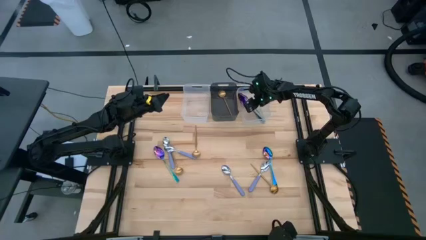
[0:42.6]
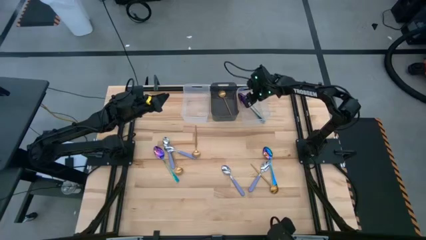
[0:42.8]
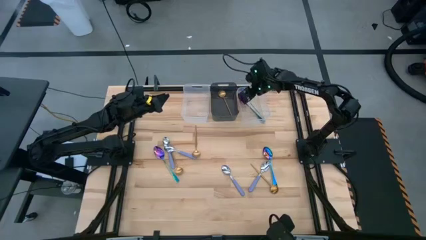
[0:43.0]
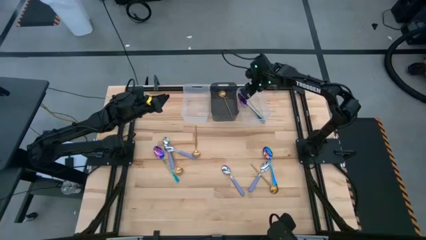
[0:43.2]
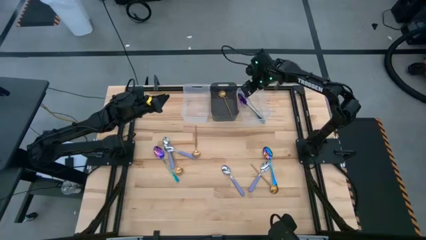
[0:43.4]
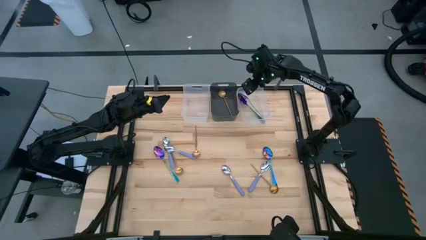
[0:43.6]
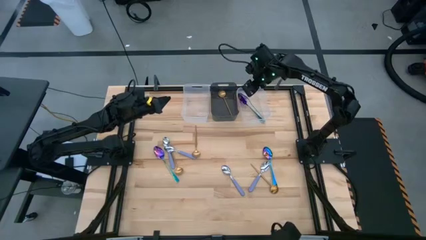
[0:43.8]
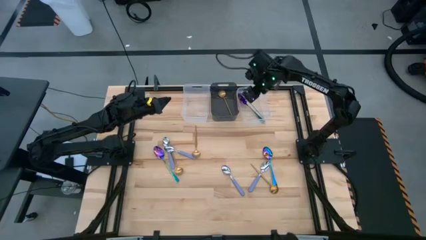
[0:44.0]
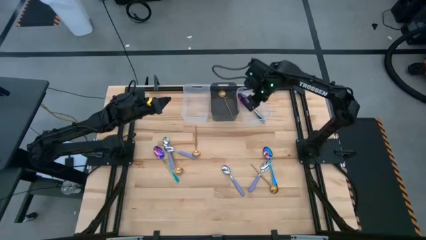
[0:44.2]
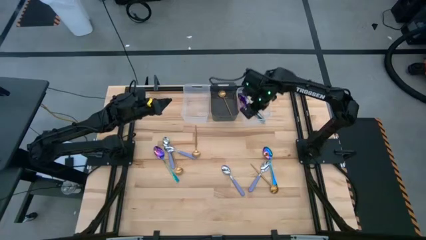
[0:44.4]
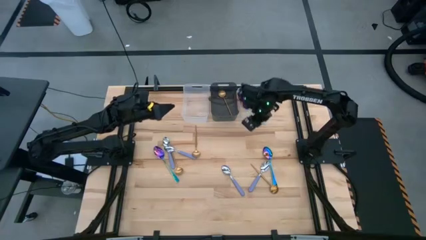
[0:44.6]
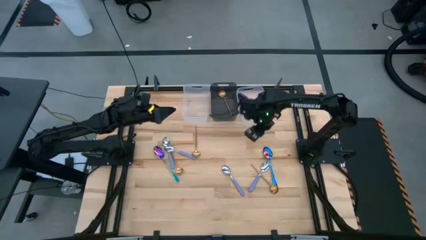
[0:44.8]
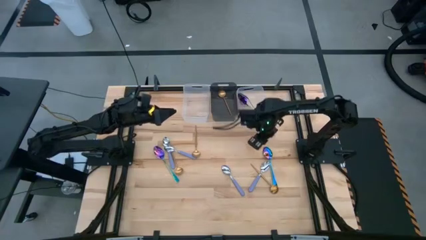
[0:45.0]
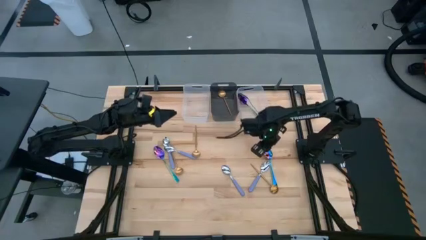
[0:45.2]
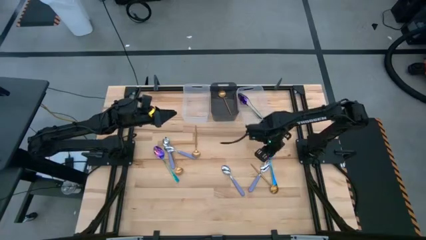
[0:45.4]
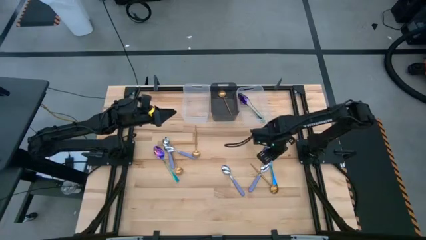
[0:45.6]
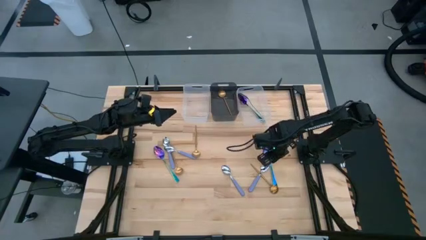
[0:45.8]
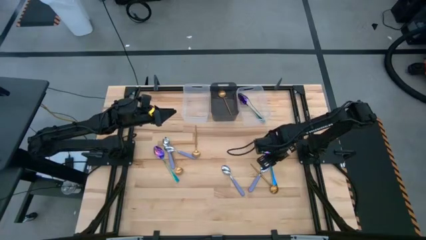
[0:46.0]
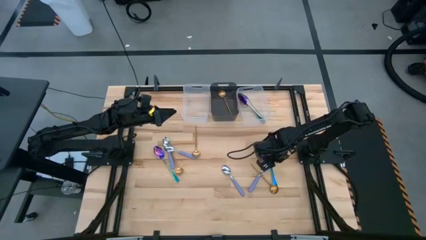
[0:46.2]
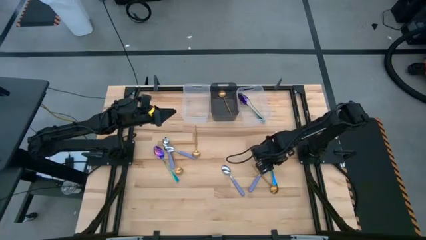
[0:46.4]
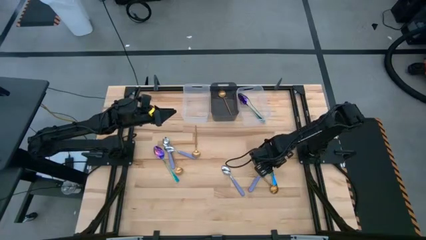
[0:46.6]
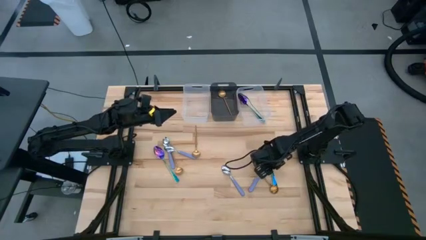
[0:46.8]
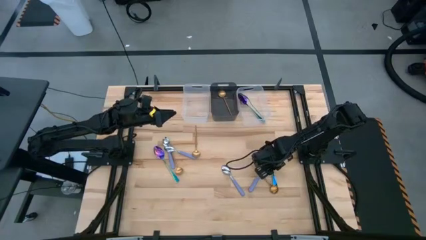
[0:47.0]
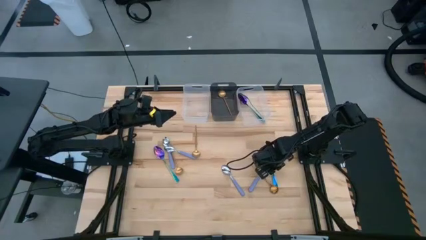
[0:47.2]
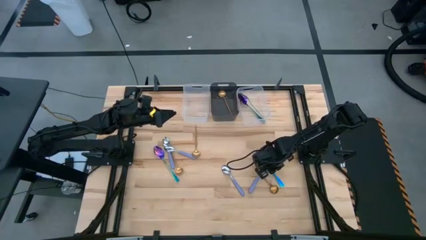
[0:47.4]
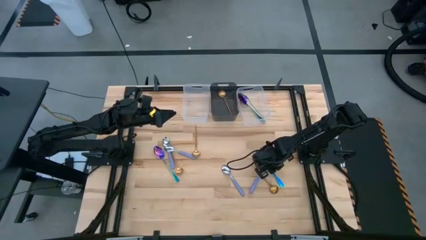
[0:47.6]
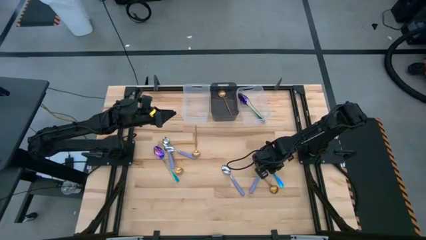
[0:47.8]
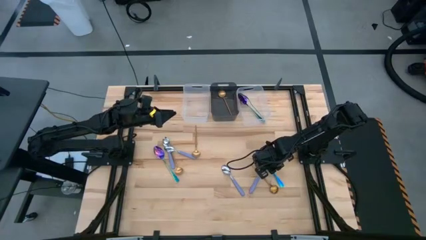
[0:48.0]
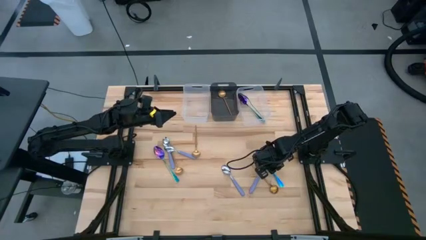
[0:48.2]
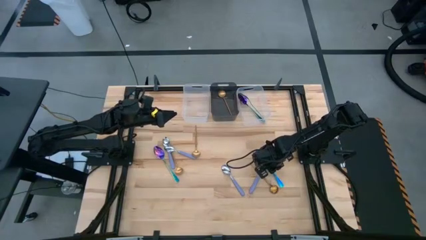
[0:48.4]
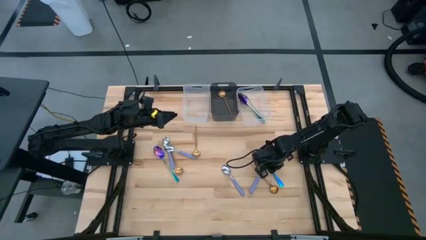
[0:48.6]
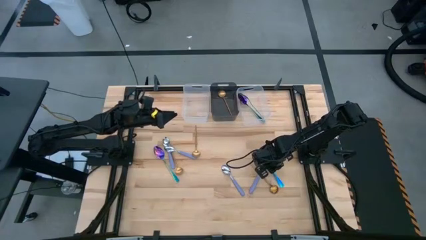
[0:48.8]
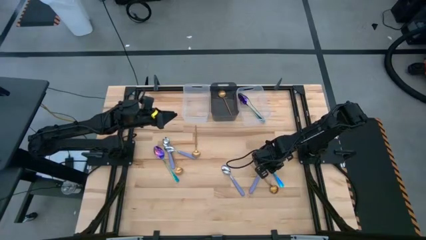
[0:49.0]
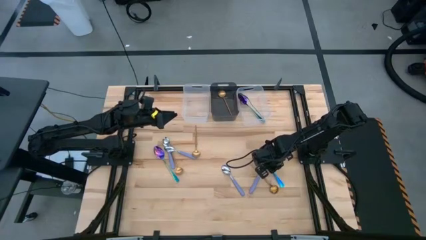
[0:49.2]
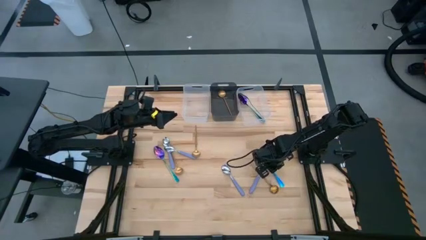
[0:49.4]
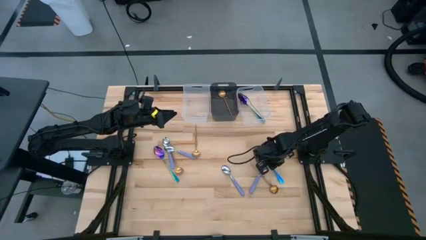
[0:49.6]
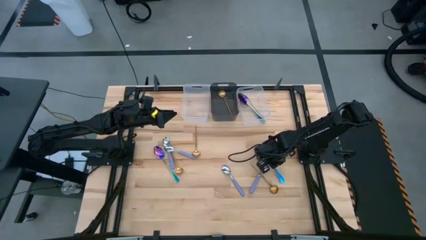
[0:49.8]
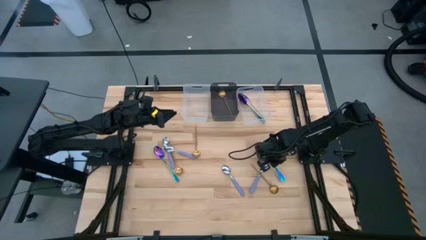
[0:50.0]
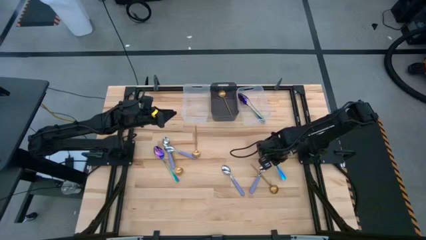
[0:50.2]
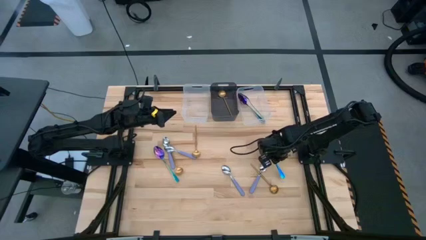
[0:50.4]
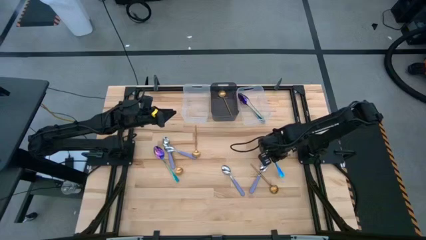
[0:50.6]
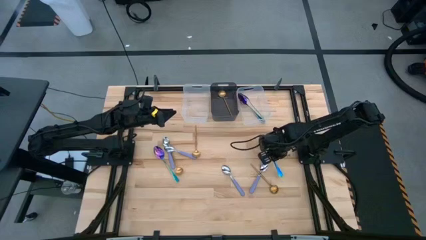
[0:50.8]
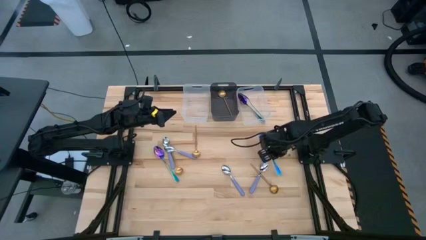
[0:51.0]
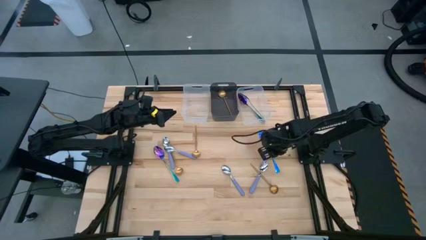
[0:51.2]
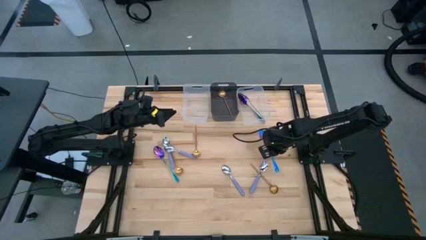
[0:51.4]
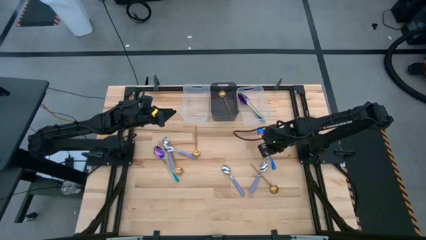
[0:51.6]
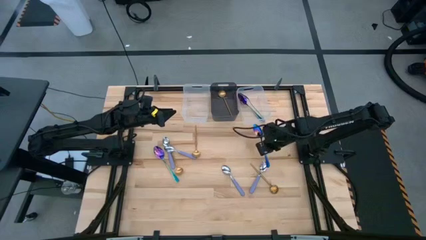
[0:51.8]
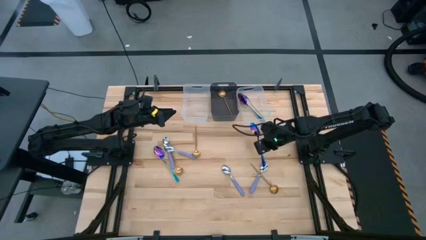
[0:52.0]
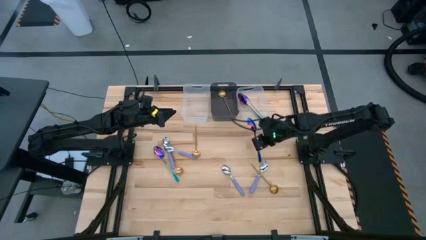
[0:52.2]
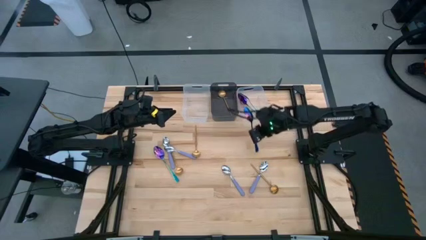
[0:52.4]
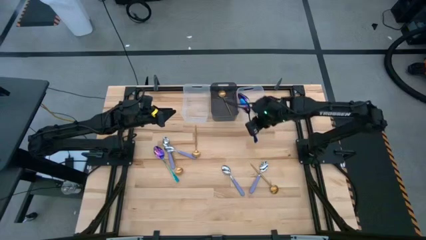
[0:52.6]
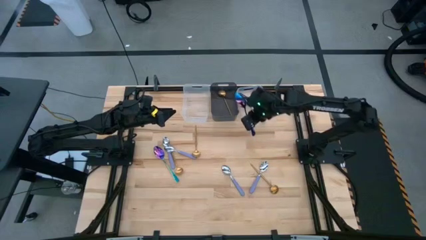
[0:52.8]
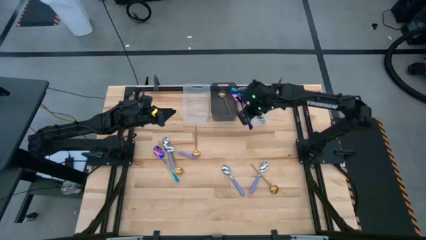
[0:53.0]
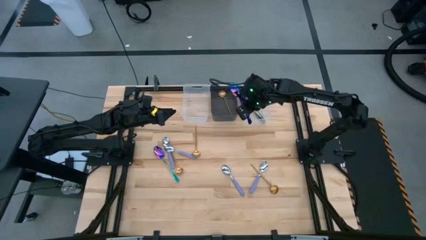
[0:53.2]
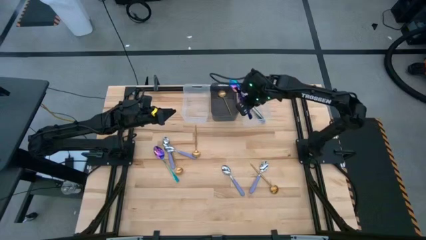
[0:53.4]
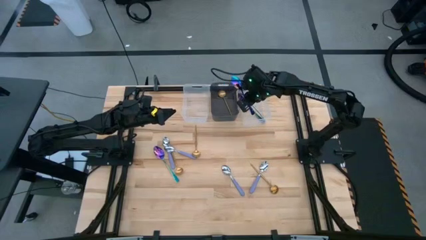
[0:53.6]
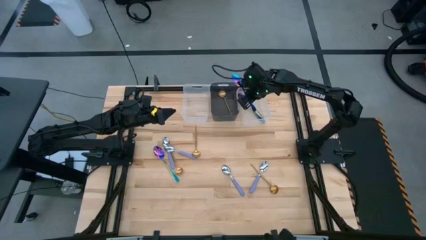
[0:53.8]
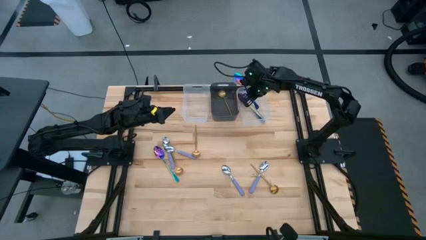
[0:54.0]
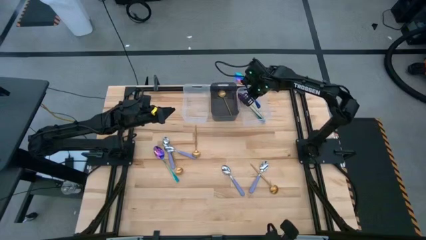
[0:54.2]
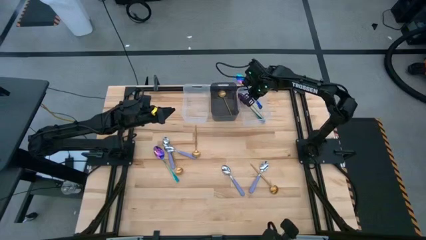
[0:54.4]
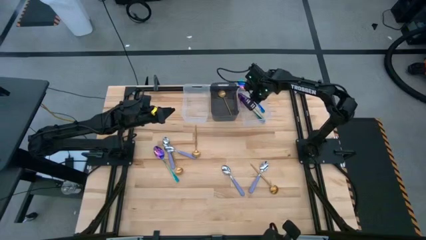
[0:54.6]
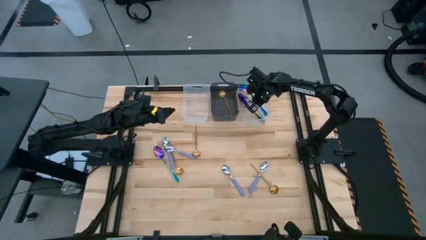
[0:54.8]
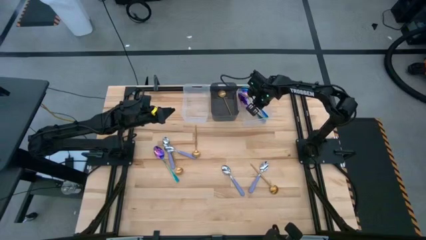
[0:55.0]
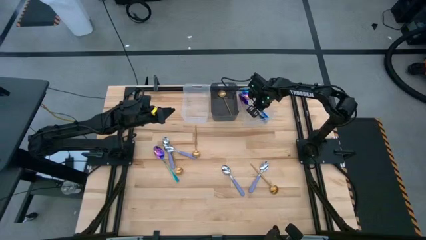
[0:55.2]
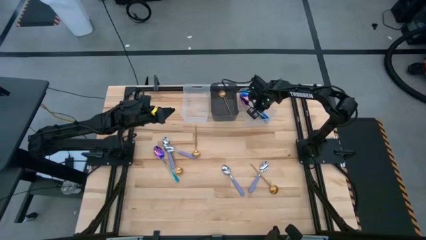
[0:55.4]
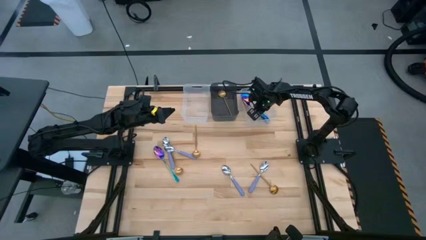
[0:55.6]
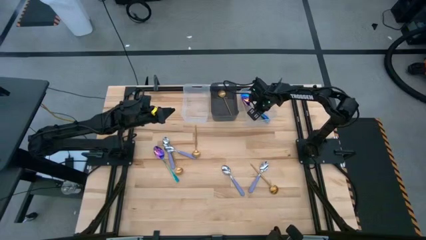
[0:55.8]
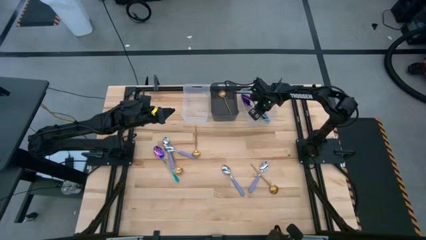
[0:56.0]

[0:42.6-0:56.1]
Task: Sort silverware by color (type)
Put the blue spoon into the right transparent bin
